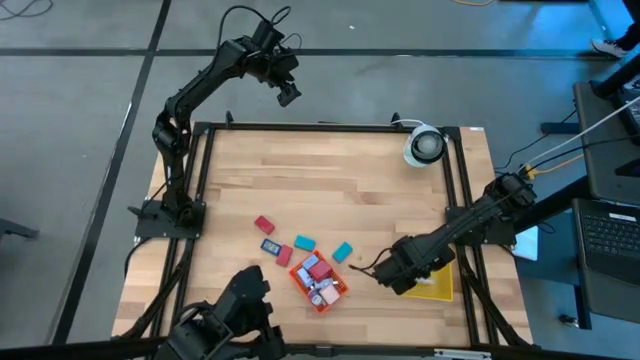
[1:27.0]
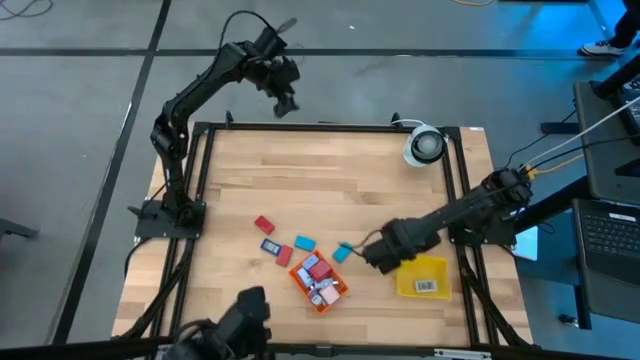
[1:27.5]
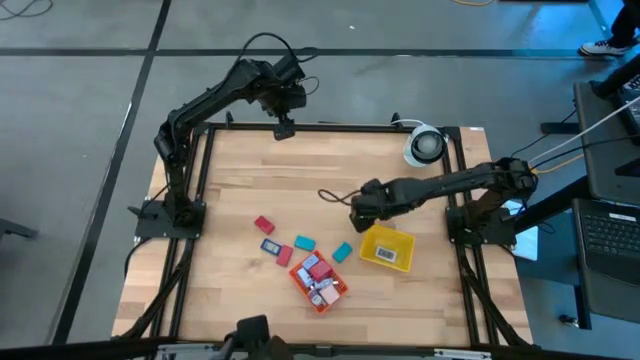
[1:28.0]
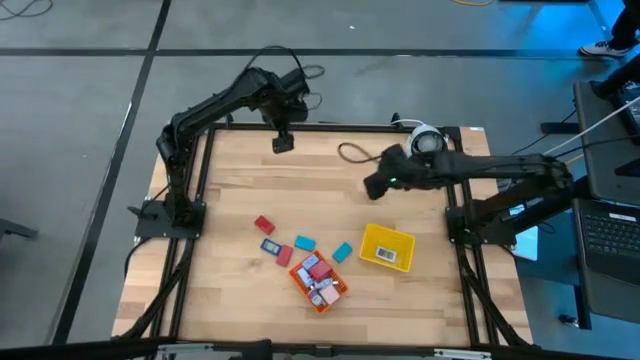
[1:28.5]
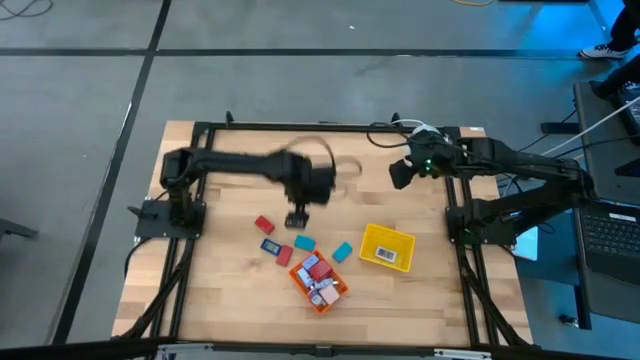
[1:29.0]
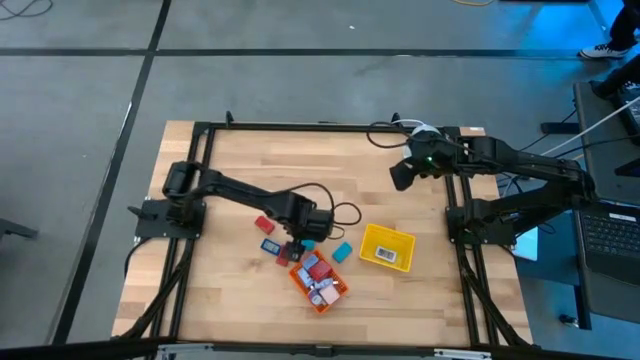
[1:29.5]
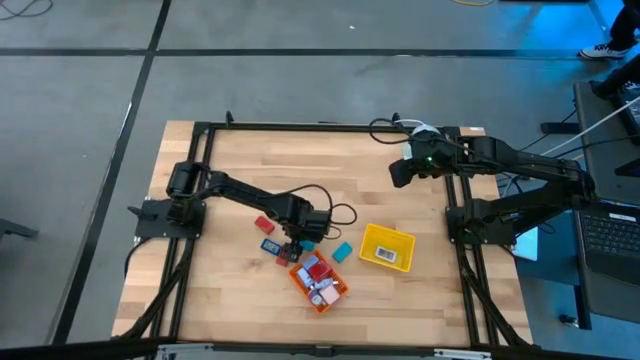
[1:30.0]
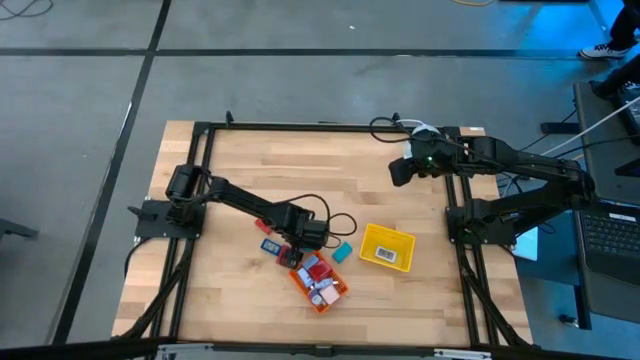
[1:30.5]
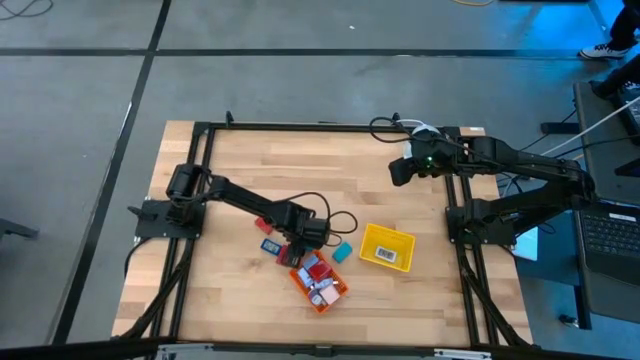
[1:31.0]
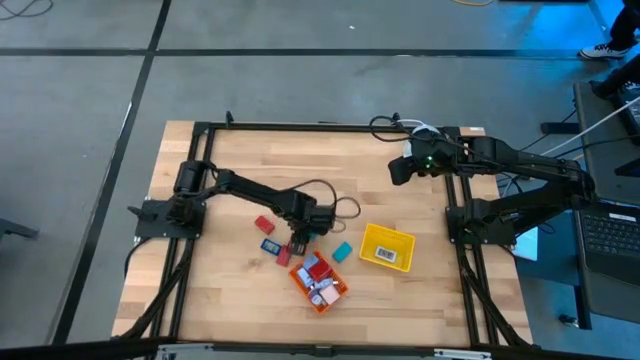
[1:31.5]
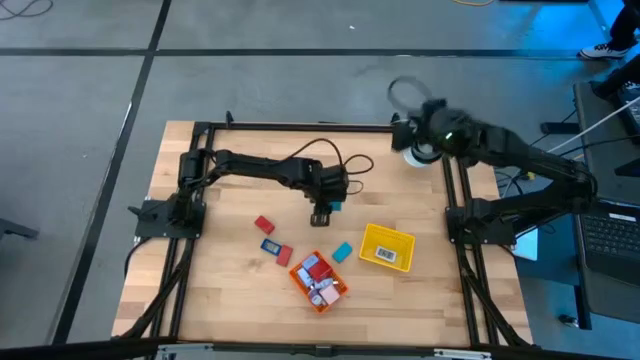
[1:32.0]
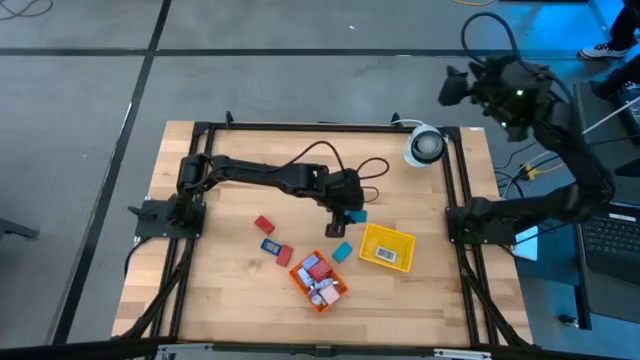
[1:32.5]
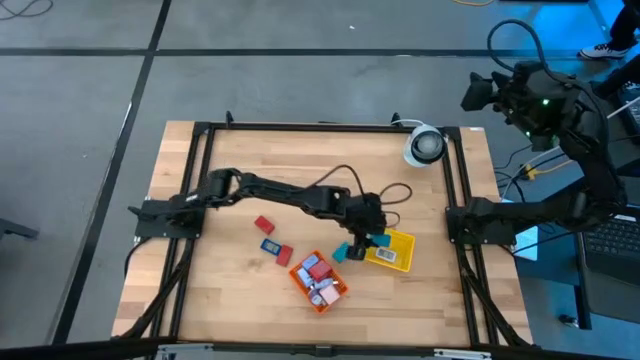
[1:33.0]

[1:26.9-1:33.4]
Task: Pick & Place Office items
Put the left light blue digital clock into the yellow bin

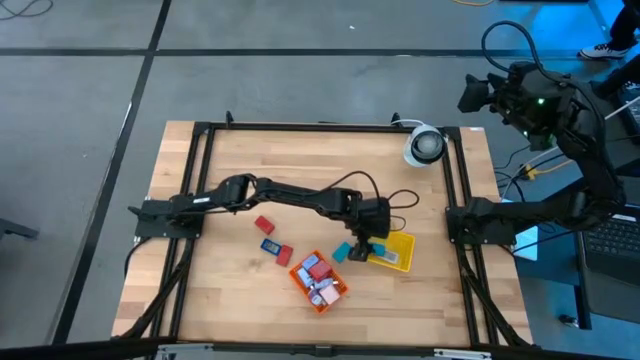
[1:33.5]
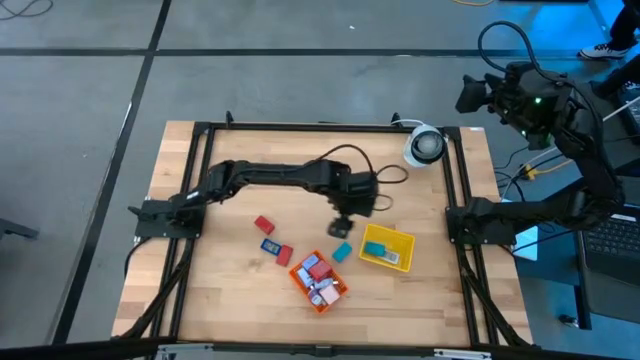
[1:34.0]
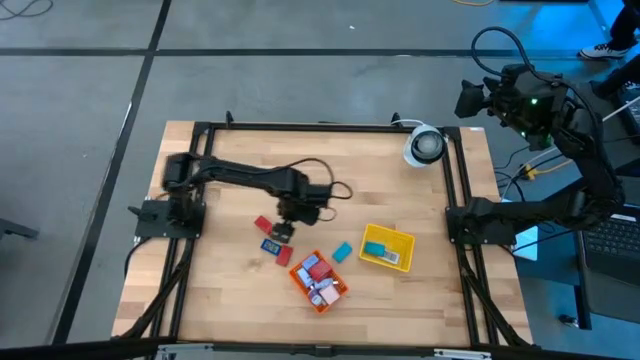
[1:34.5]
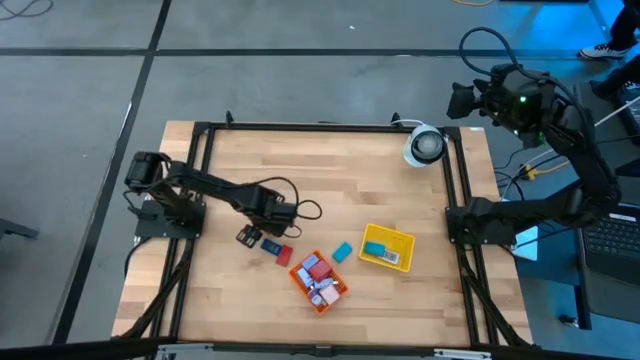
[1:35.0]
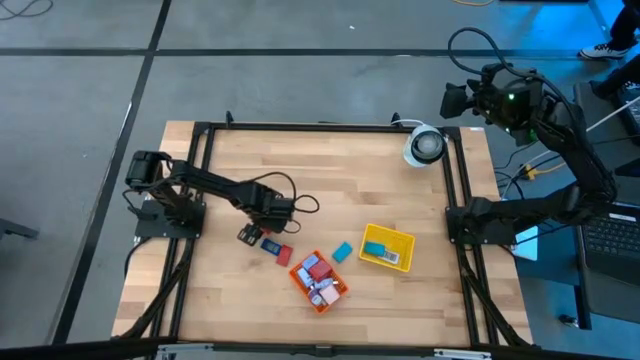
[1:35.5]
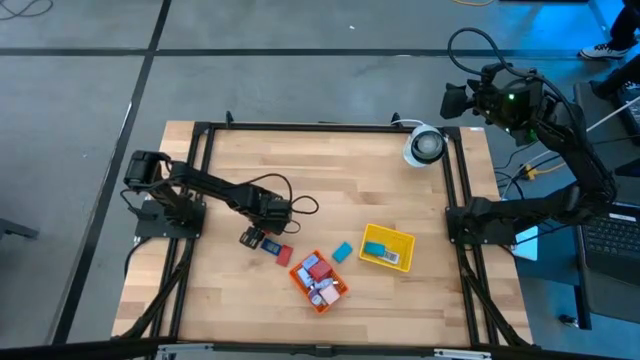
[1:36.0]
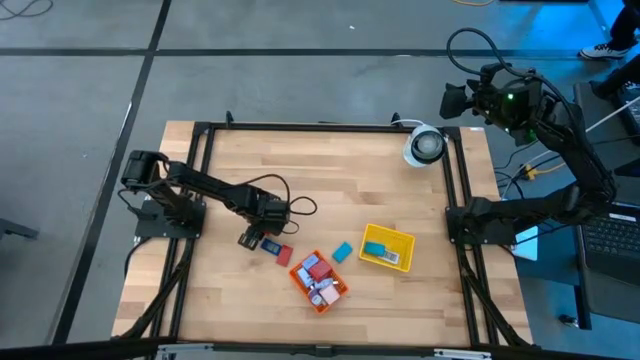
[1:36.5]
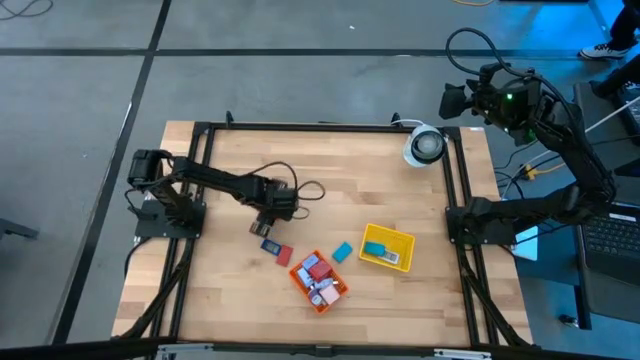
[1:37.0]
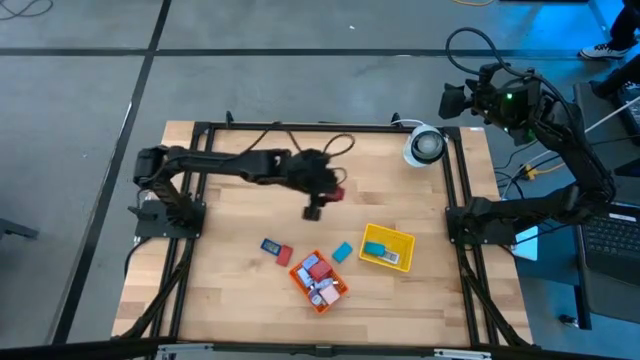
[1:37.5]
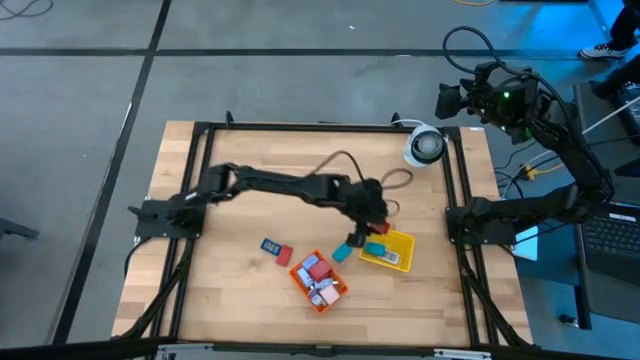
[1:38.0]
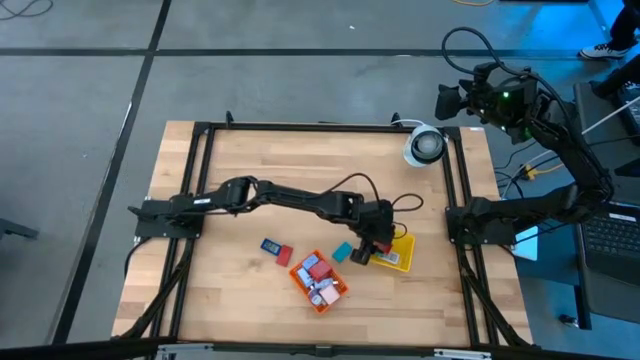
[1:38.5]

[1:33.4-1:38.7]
Put the top red digital clock into the yellow bin

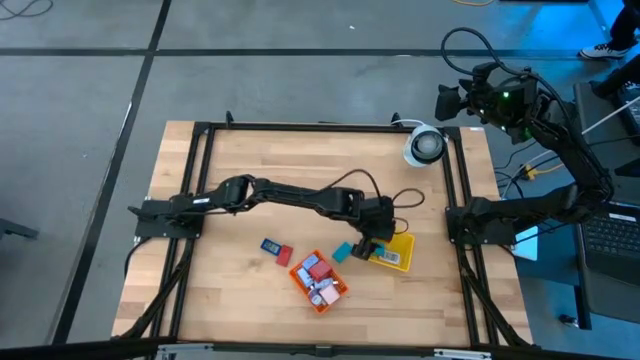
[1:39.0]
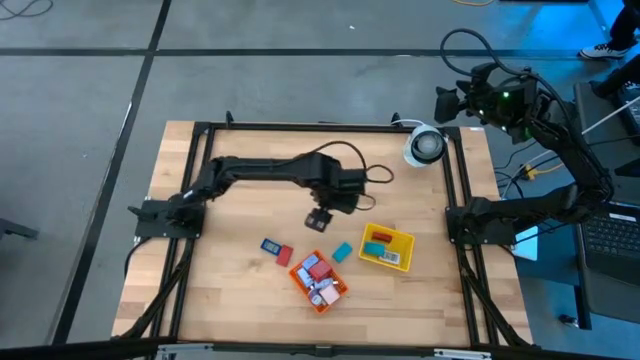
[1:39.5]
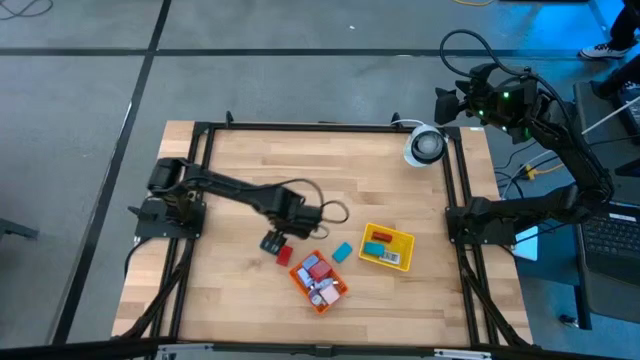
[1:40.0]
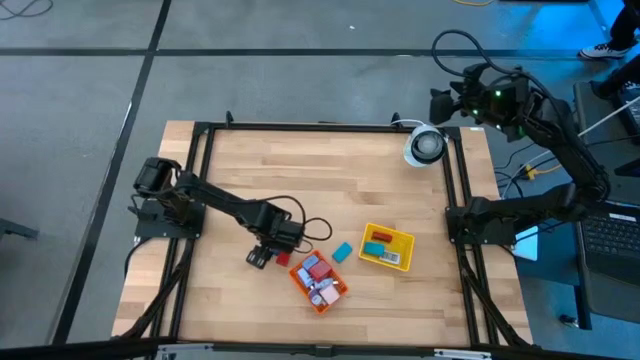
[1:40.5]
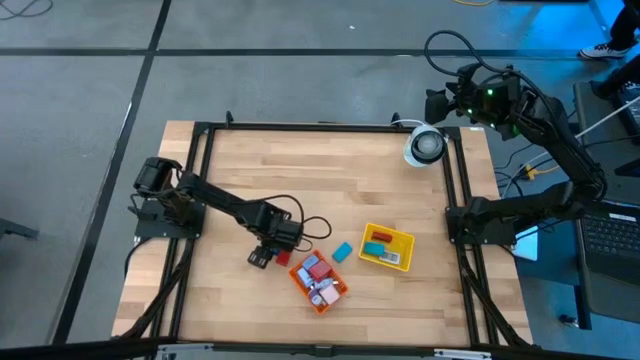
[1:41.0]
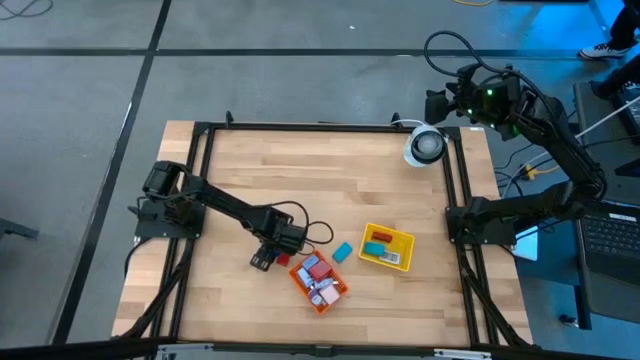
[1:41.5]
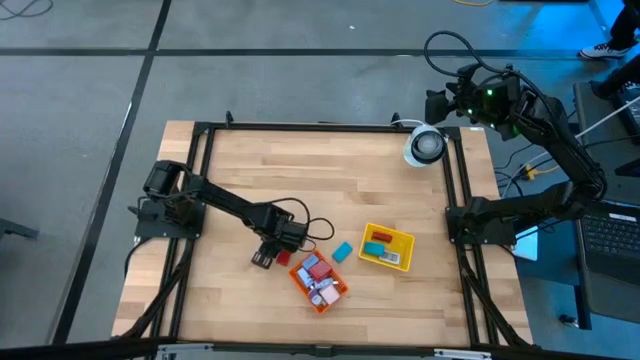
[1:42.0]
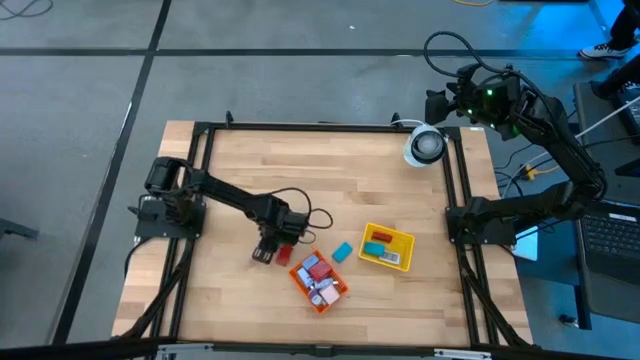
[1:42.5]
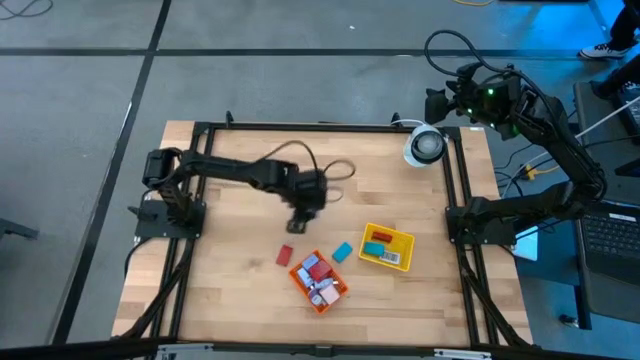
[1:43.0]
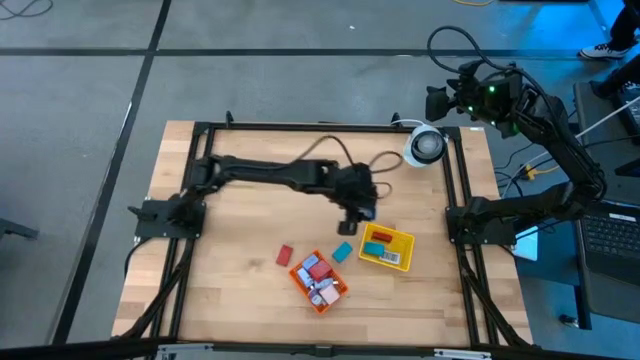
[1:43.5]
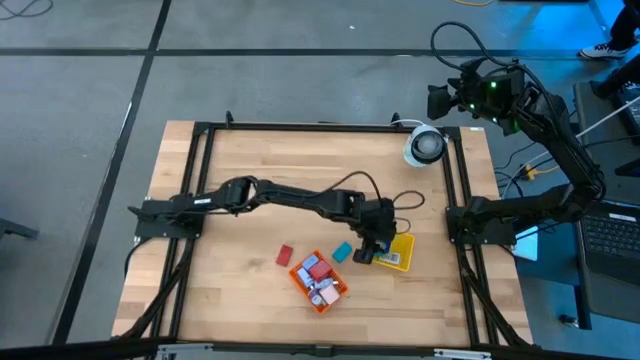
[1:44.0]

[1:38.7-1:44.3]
Put the blue digital clock into the yellow bin

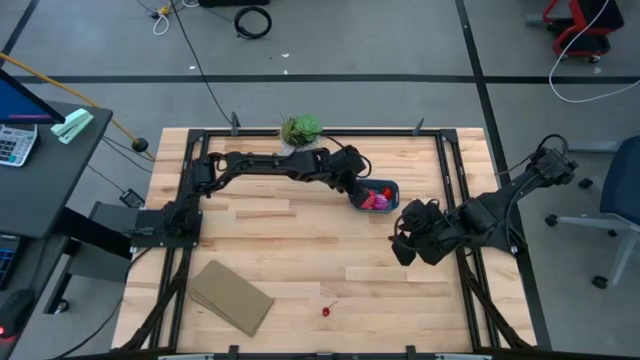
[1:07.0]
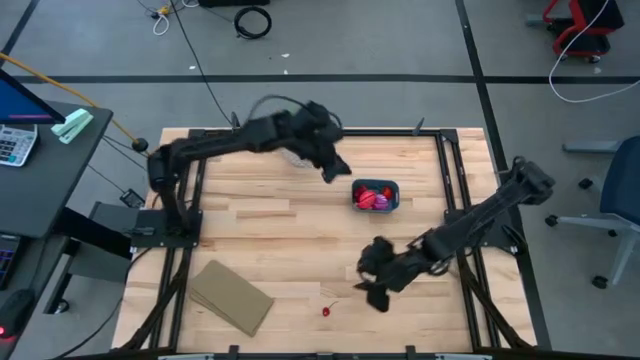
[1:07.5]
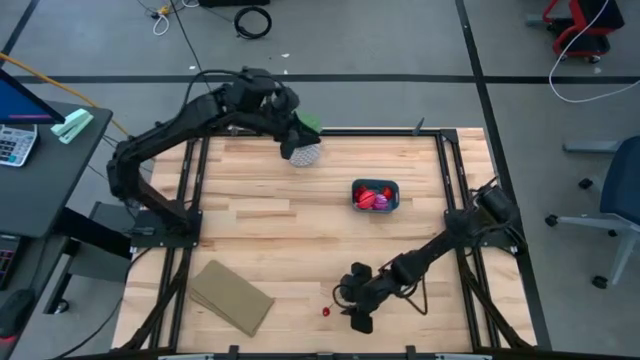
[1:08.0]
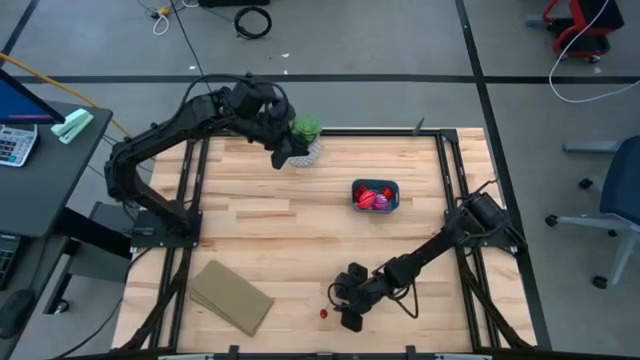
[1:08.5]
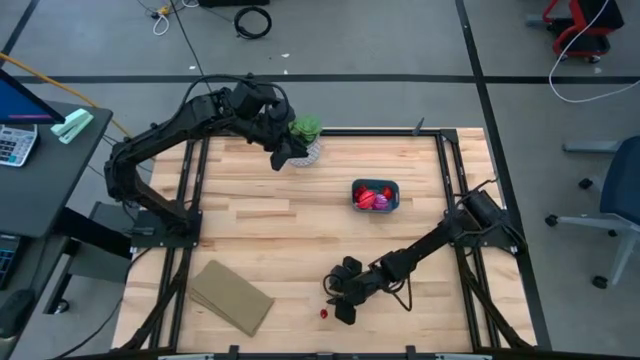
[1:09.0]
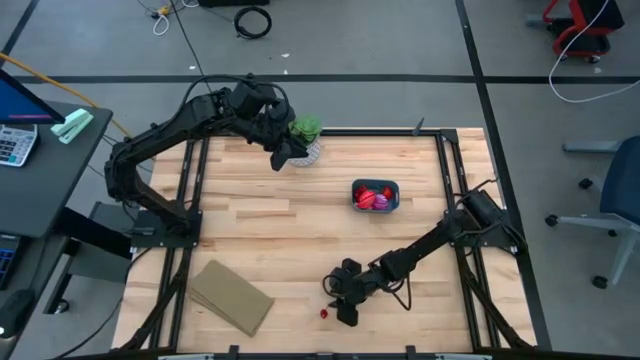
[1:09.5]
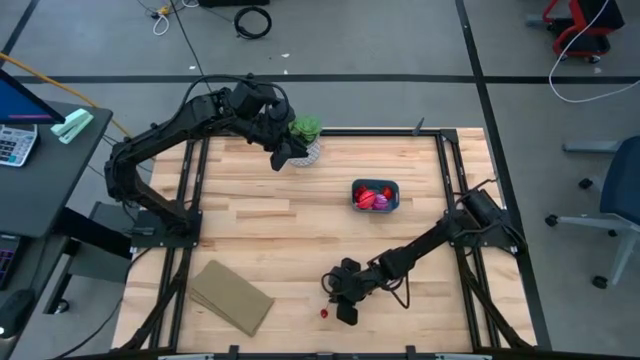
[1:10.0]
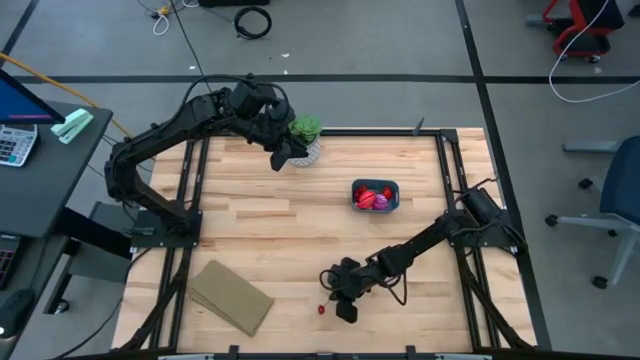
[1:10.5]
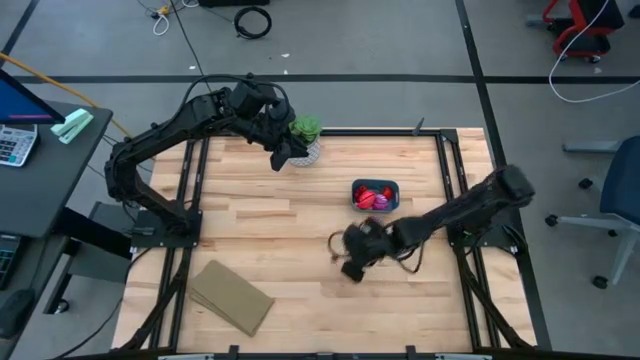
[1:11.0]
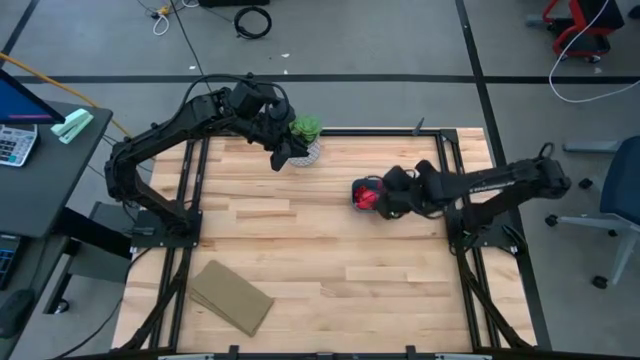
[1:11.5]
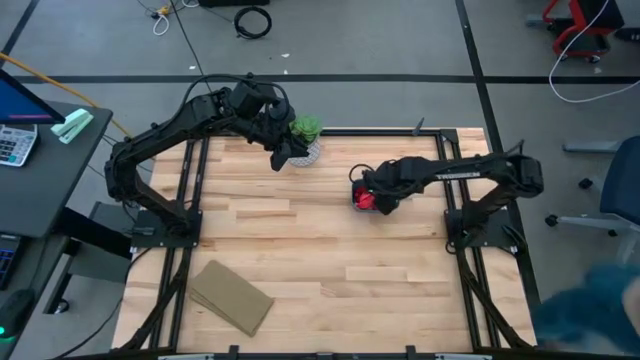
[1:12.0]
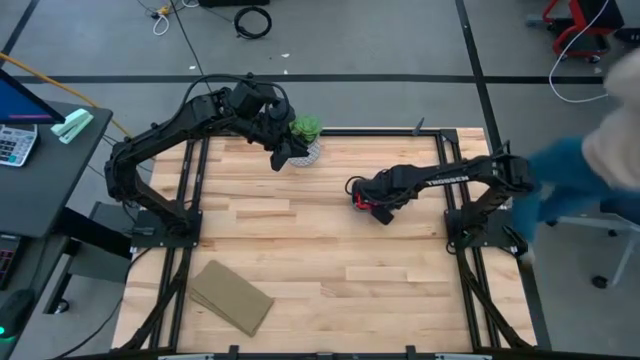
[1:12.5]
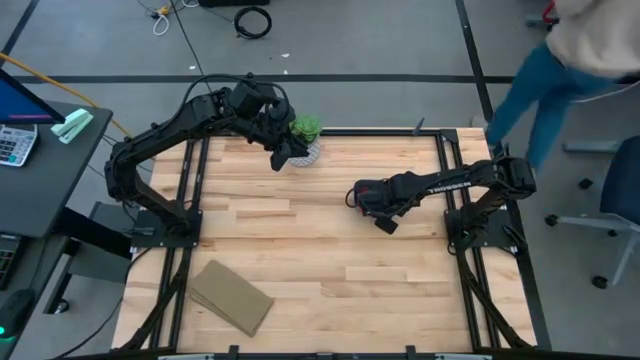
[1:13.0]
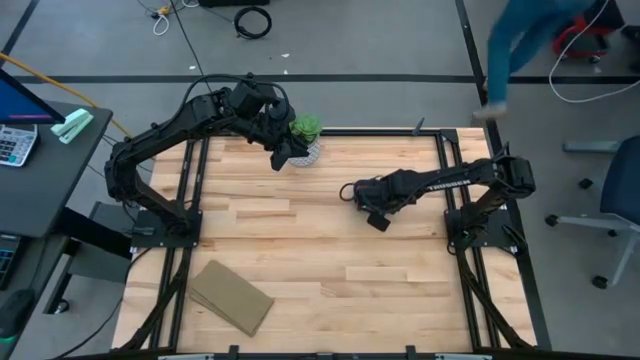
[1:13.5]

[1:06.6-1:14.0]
Task: Pick and placing Produce into tupperware
Put the red cherry into the blue bin
